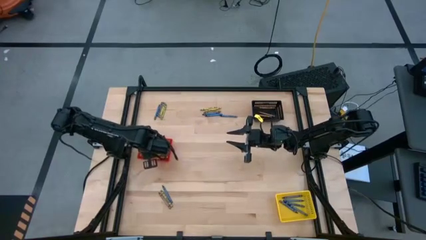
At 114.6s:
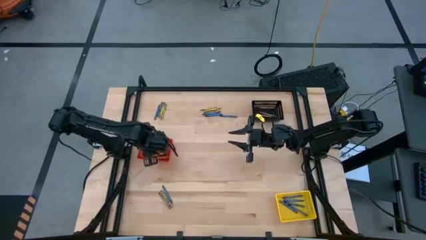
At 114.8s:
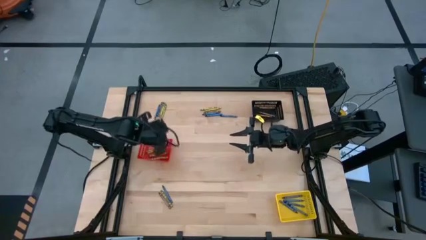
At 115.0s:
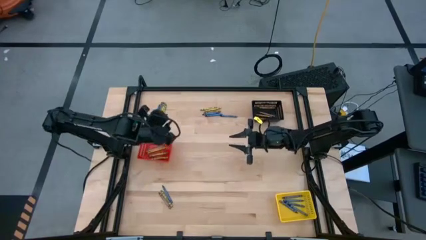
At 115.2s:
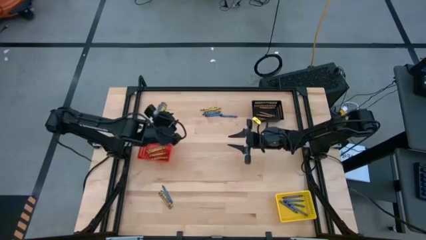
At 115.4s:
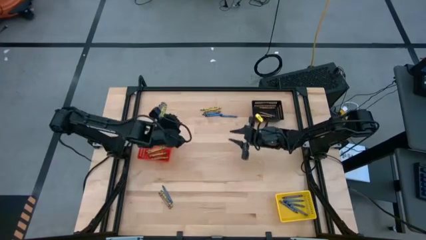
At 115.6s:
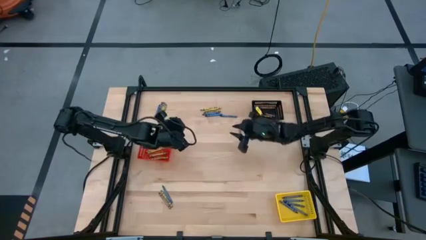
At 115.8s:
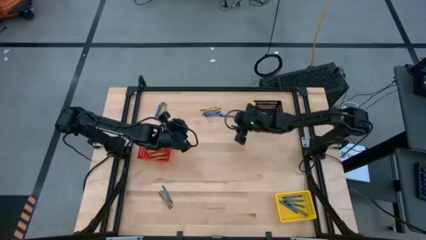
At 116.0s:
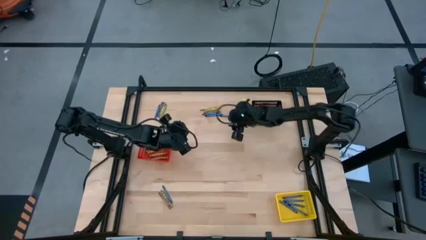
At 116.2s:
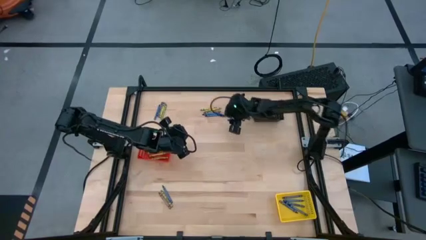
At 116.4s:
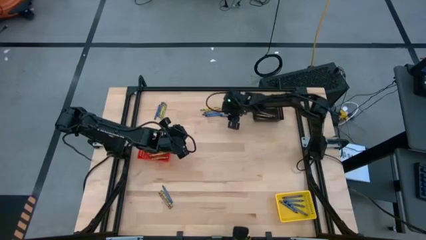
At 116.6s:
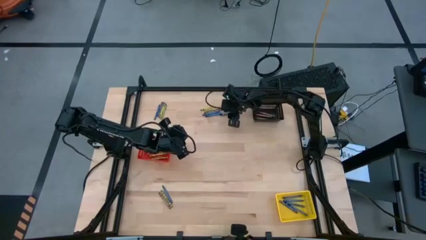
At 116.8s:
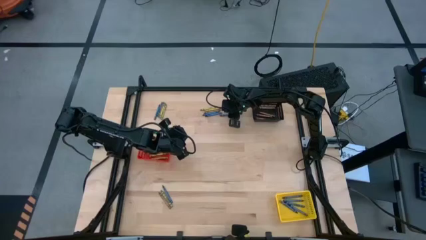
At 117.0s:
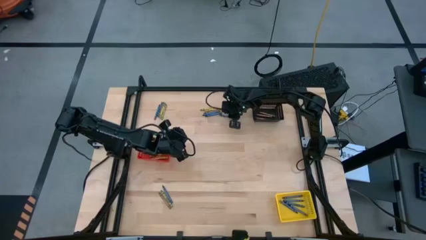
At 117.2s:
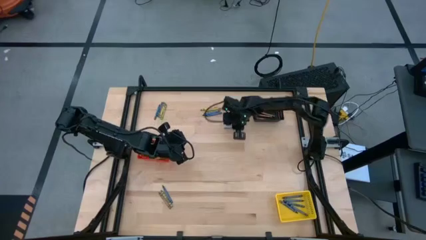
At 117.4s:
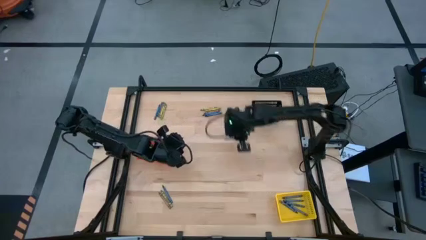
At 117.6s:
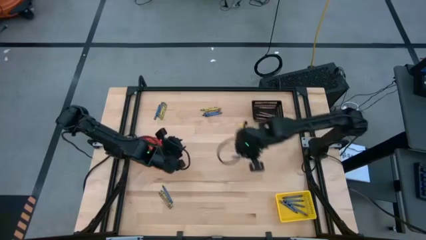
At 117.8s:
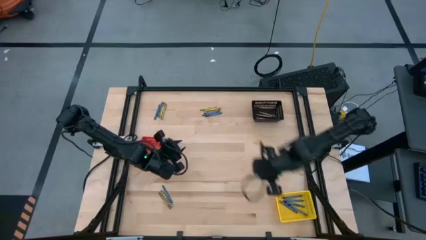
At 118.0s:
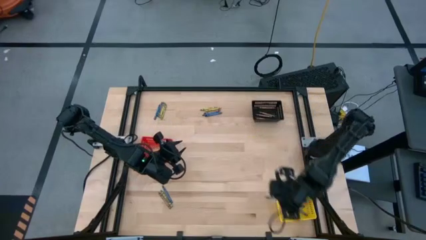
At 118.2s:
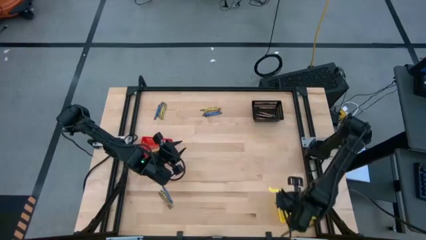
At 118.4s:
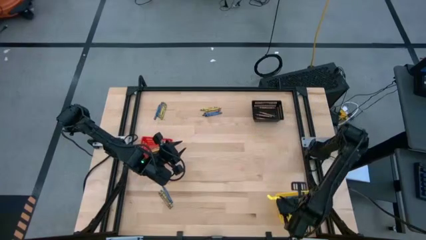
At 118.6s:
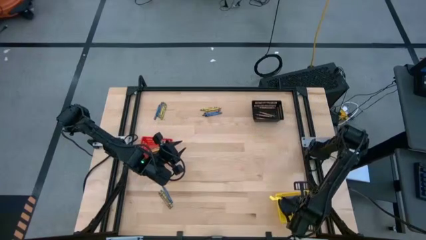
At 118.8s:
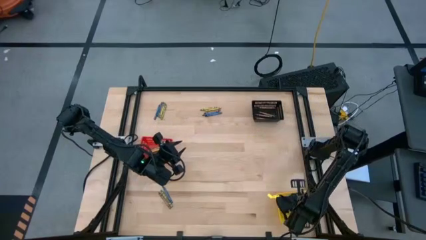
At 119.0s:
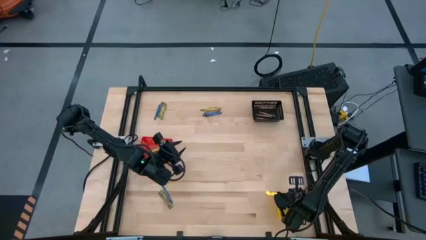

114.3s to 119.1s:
Task: Sort crayons
Put the blue crayon into the yellow bin

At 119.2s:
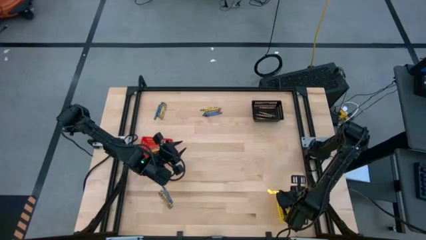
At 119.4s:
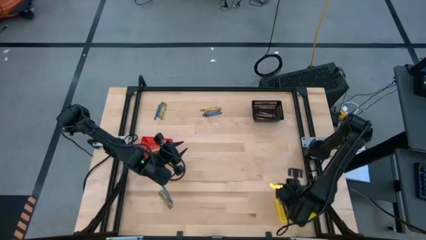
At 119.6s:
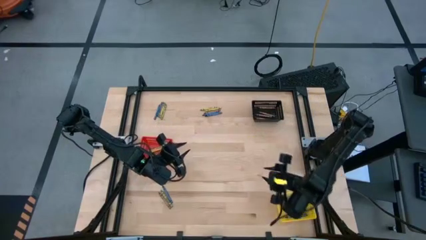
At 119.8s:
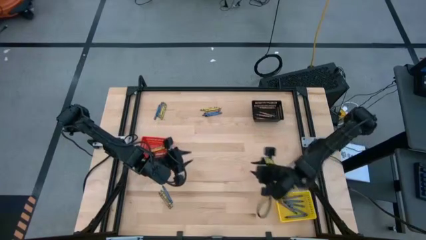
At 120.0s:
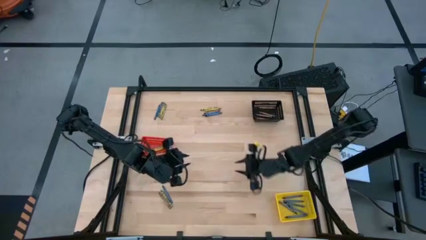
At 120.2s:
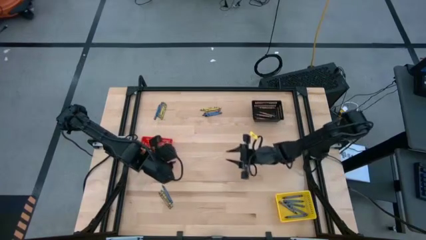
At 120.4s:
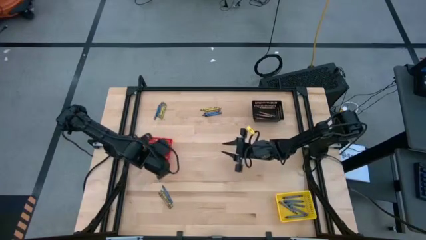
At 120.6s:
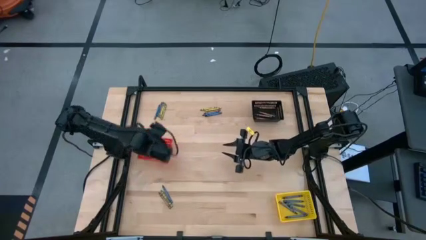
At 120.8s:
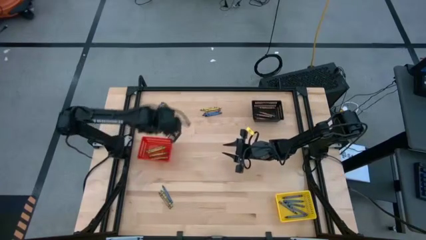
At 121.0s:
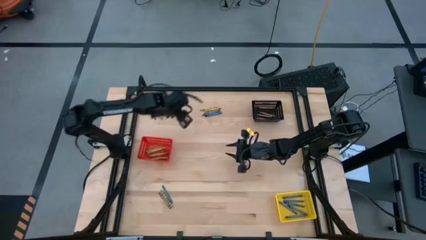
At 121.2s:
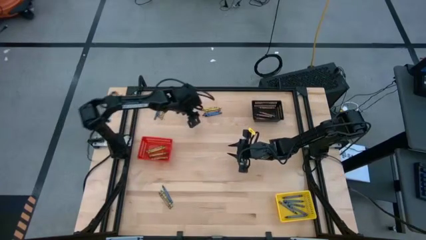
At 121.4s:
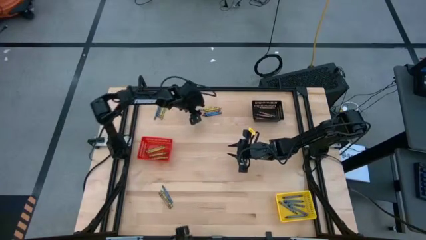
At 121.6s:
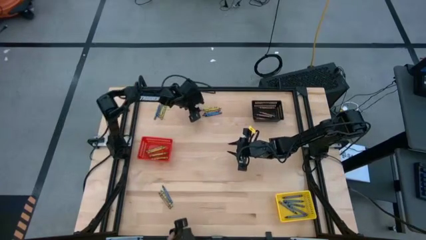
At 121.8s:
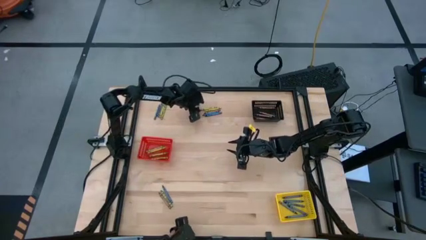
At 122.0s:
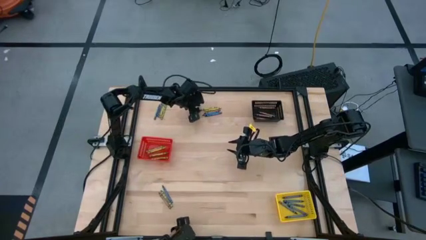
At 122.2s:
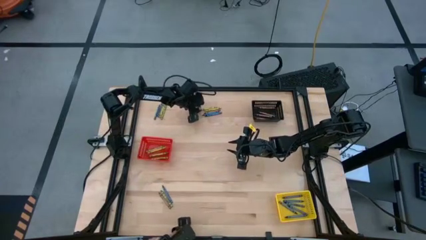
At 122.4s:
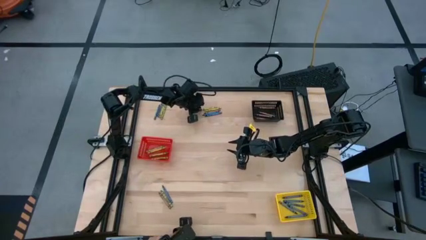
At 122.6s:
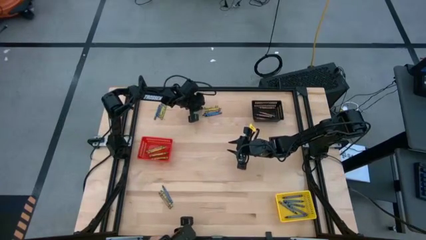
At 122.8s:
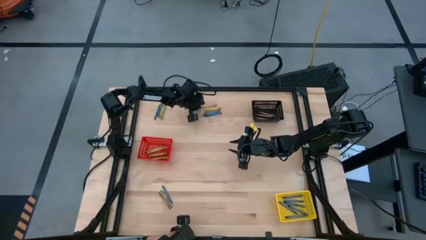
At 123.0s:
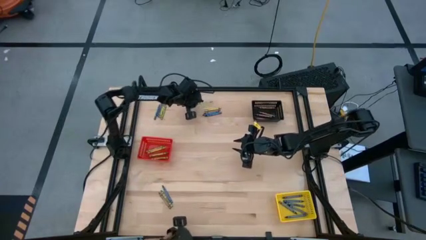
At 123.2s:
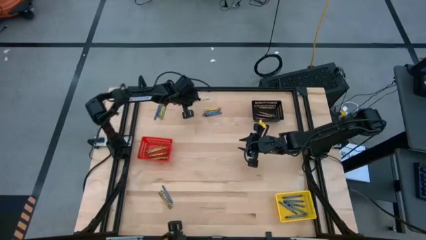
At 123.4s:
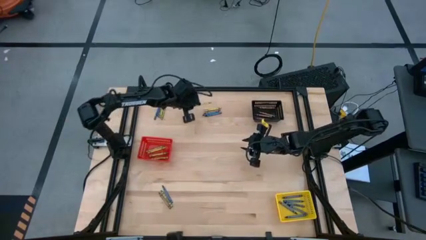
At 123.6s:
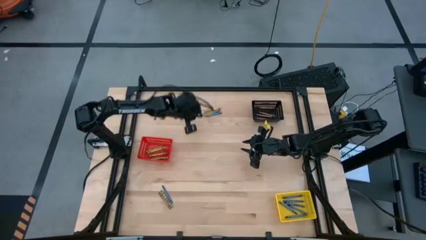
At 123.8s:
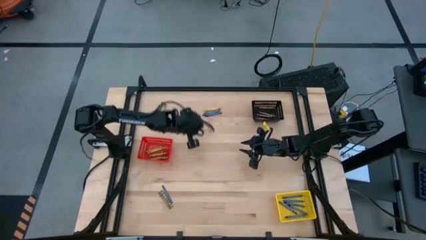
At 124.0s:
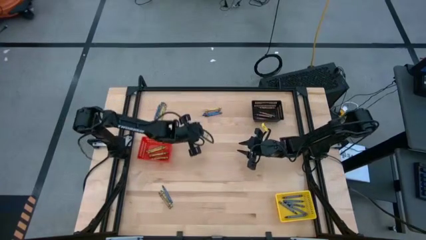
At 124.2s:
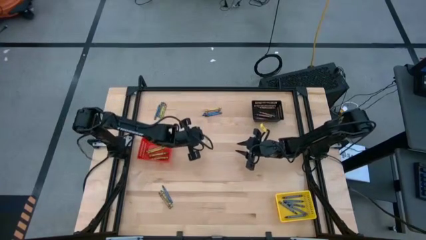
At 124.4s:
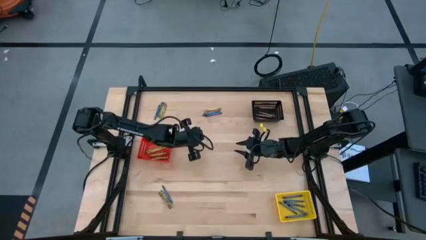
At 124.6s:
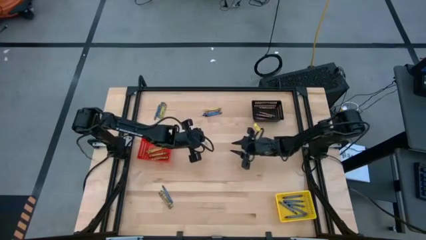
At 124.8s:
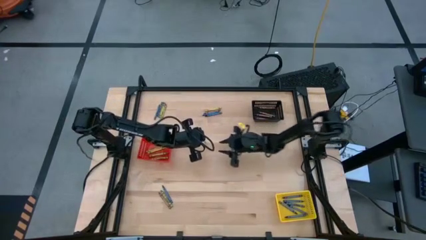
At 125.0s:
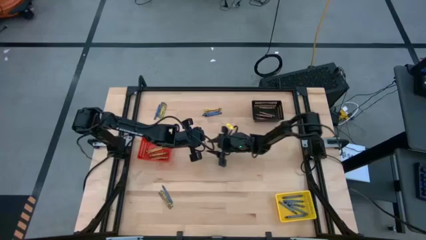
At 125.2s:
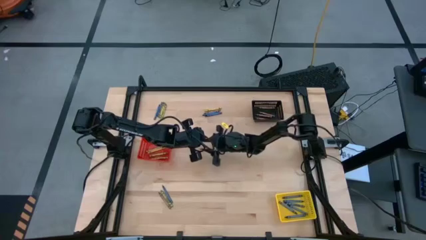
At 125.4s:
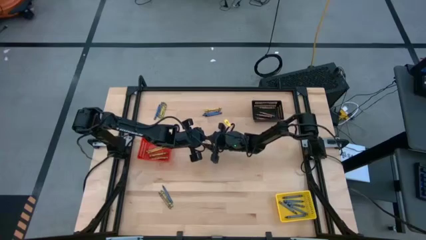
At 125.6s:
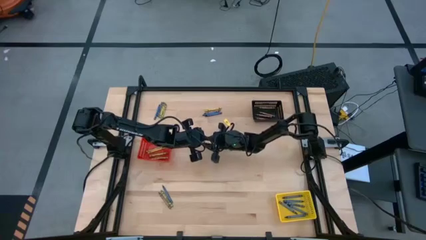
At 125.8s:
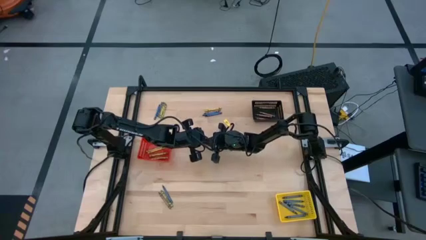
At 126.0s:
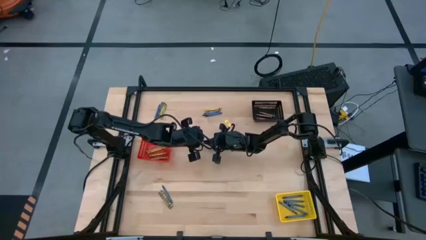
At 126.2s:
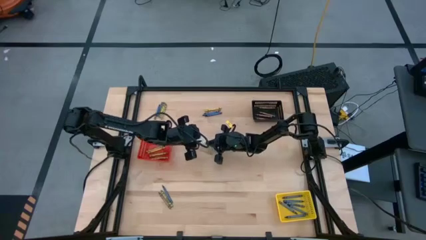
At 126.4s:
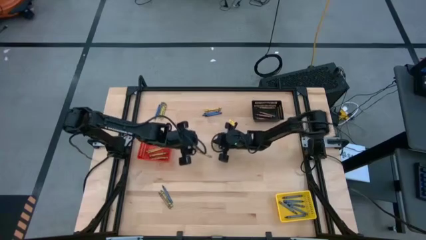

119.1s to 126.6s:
Put the green crayon into the red bin

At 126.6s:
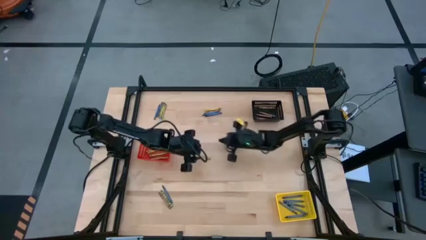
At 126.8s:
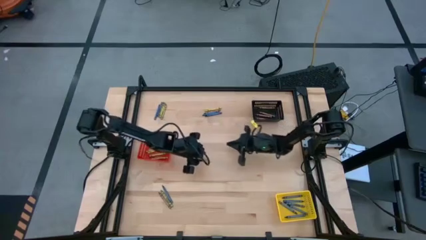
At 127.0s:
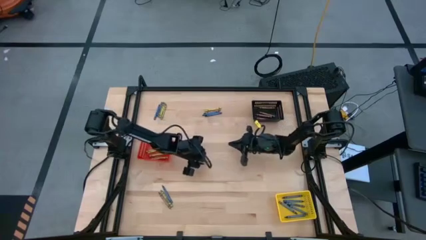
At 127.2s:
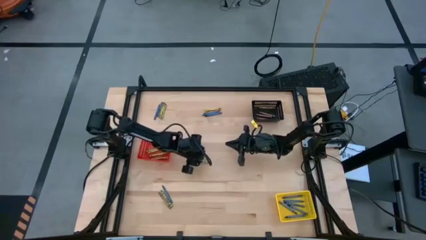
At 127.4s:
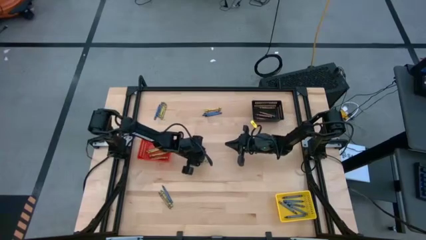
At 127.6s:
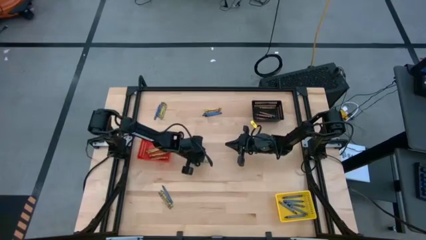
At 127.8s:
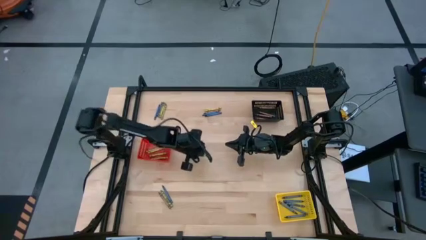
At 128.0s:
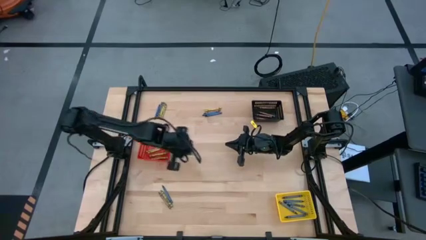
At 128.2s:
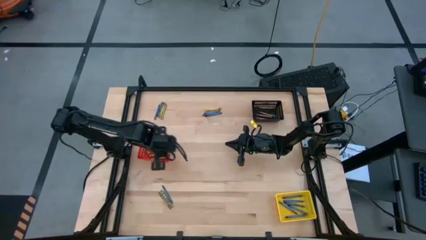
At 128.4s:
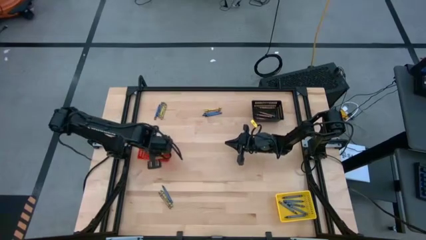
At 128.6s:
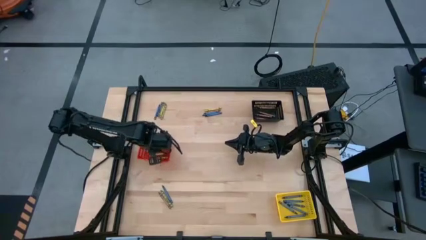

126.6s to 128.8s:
Put the green crayon into the red bin

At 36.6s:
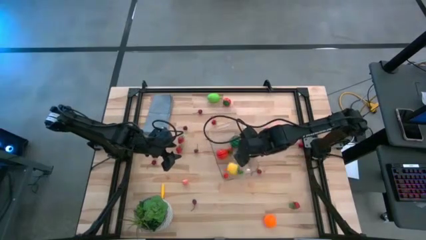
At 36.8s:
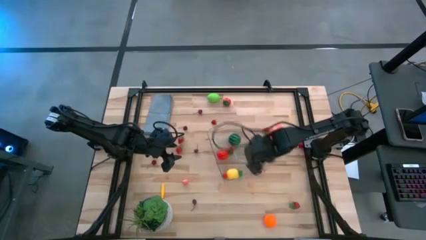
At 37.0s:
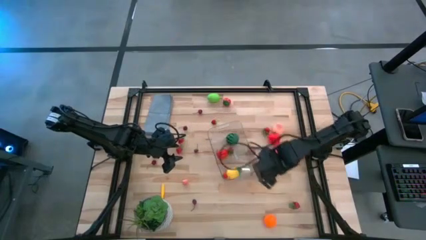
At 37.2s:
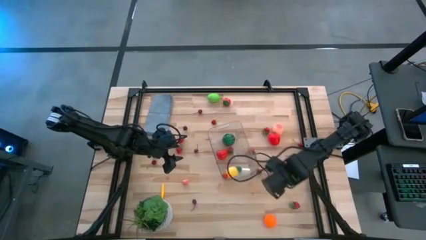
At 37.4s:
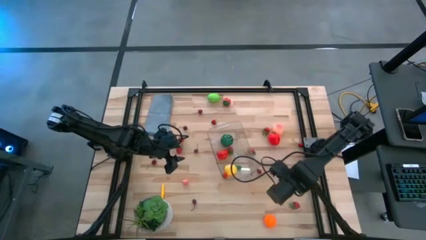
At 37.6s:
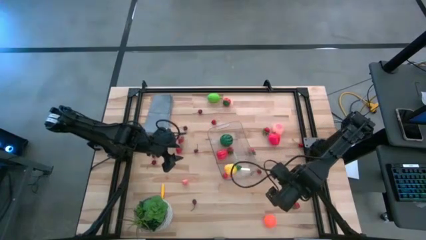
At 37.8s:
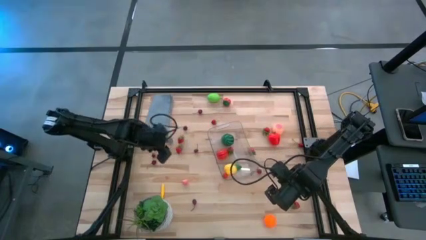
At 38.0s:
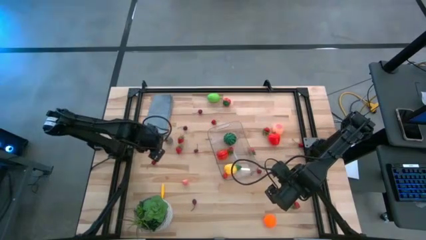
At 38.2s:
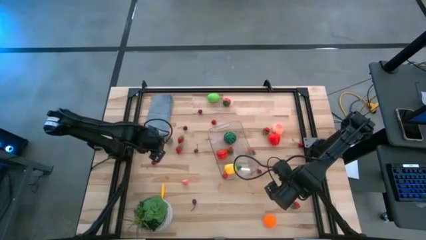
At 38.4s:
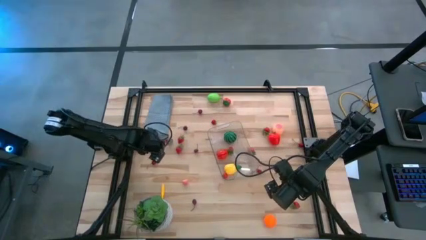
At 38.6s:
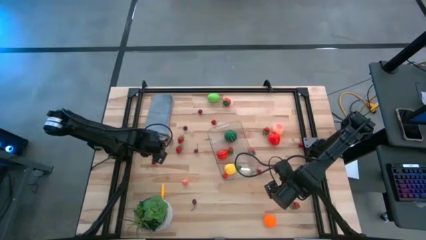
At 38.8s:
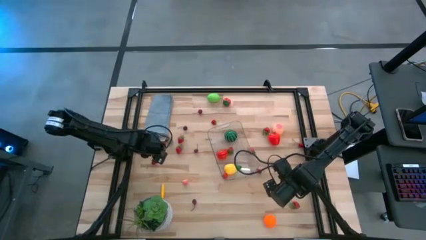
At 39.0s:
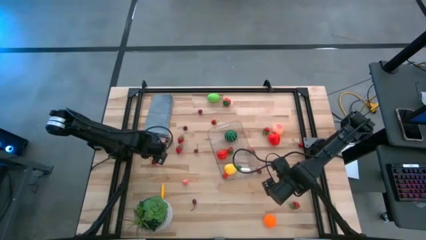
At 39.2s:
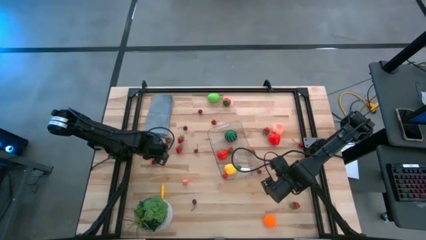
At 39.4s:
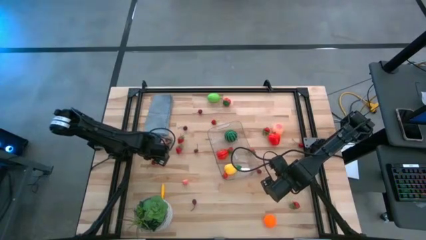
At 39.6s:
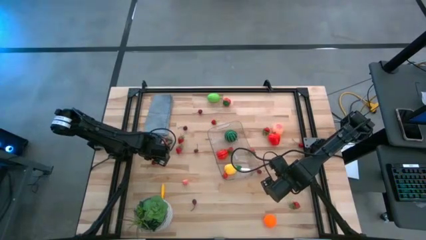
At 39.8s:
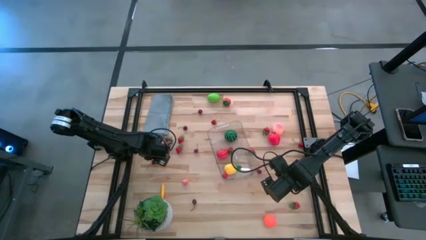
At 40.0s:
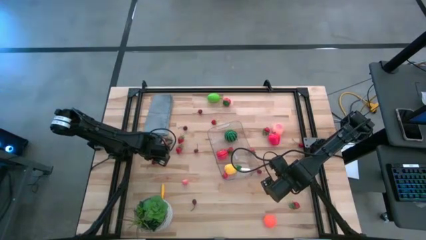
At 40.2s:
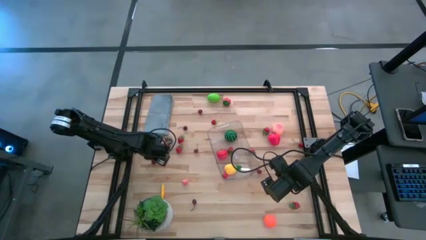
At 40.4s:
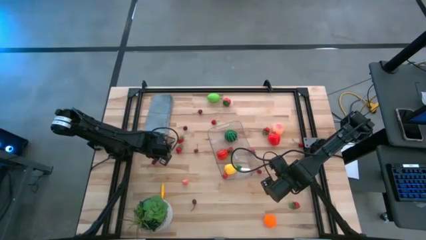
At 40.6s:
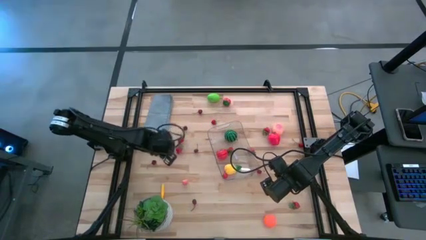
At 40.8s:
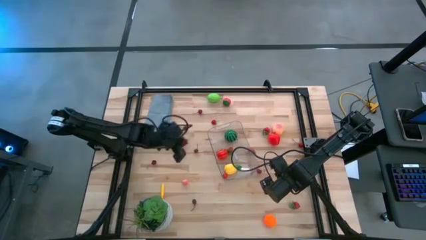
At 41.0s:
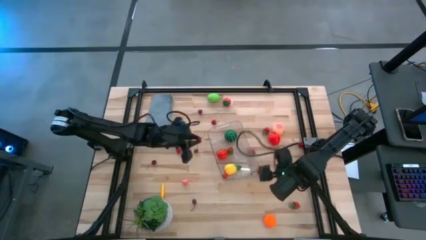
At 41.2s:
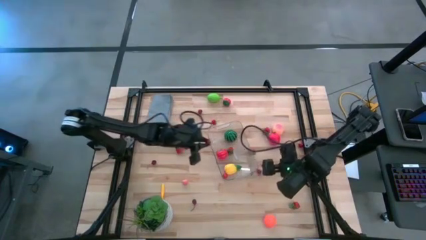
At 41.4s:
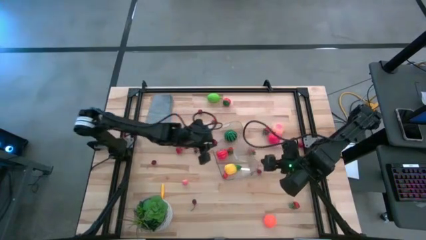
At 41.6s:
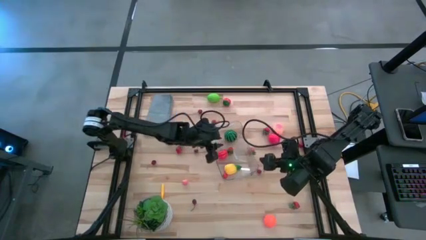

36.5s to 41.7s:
Task: Pick and placing Produce into tupperware
Put the red cherry into the transparent bin
